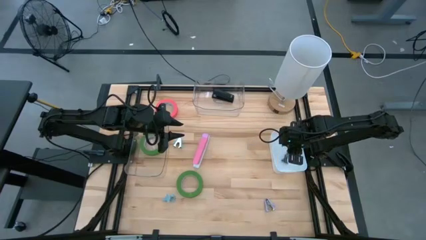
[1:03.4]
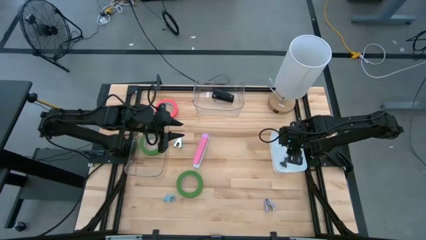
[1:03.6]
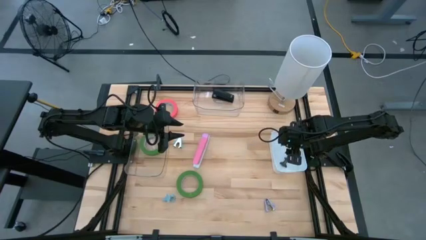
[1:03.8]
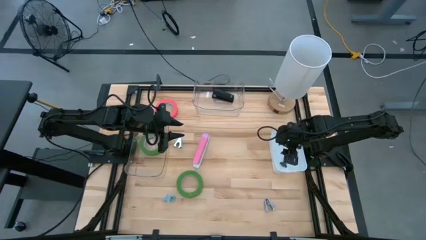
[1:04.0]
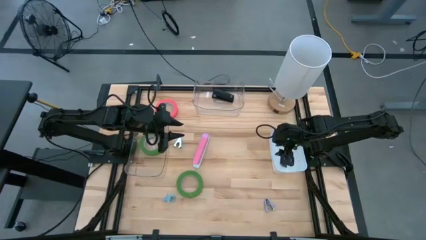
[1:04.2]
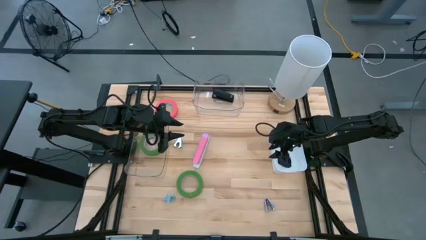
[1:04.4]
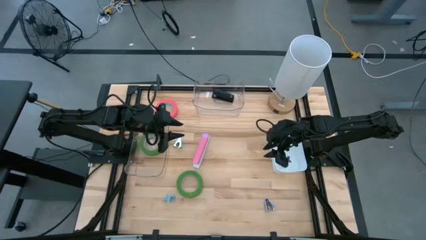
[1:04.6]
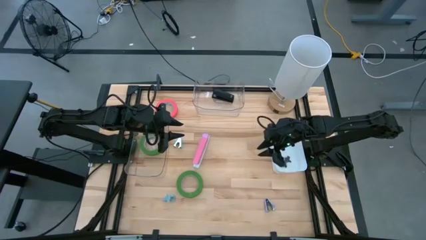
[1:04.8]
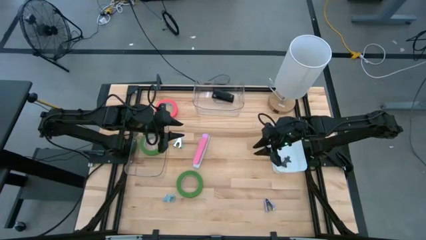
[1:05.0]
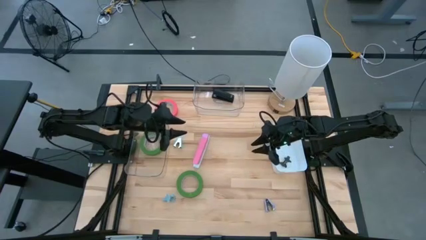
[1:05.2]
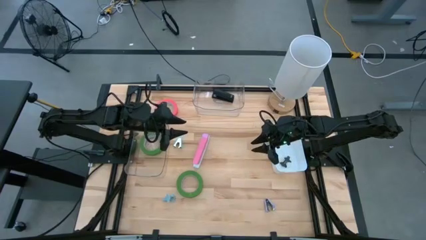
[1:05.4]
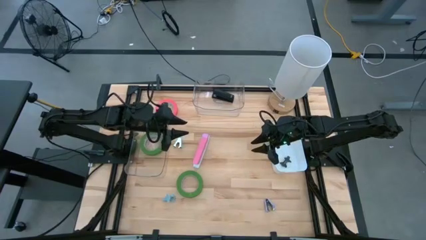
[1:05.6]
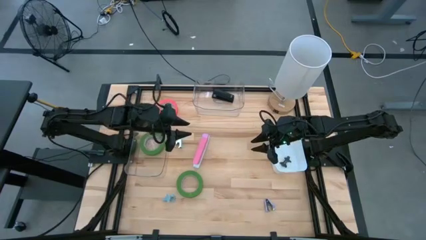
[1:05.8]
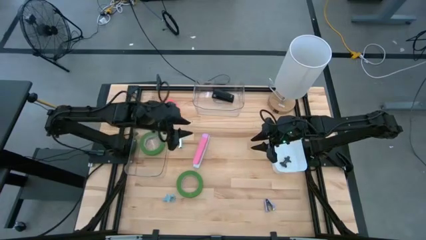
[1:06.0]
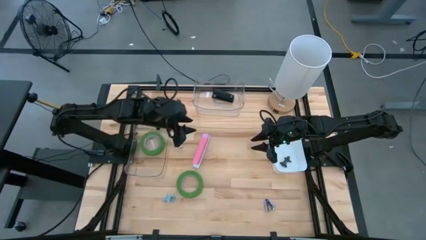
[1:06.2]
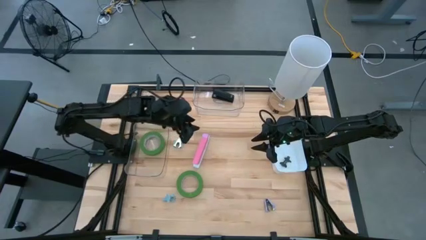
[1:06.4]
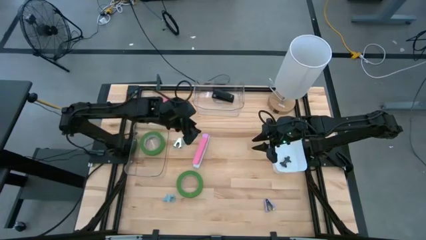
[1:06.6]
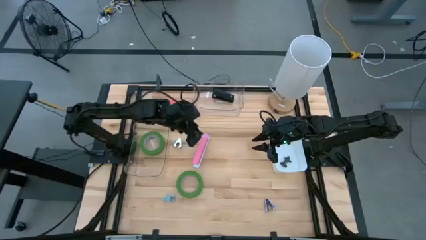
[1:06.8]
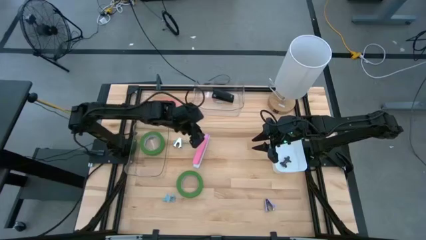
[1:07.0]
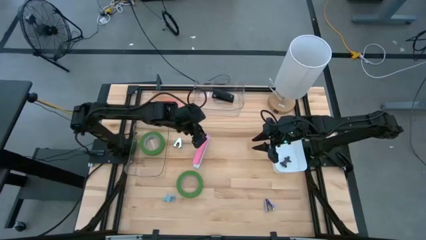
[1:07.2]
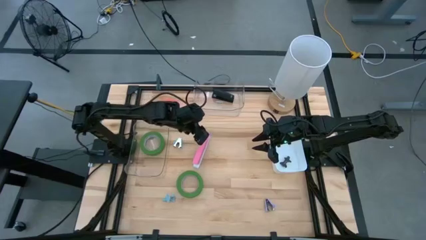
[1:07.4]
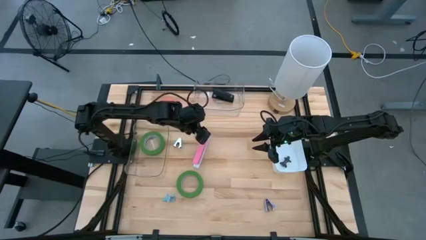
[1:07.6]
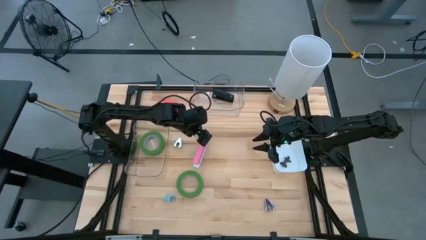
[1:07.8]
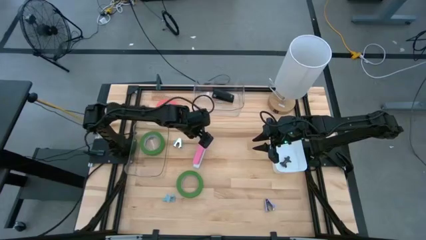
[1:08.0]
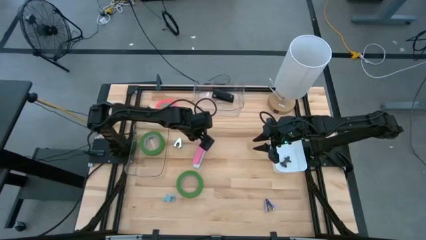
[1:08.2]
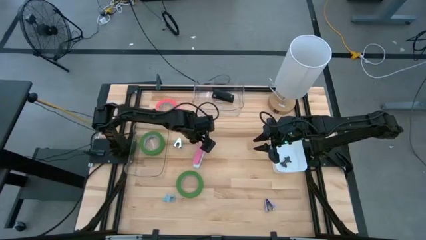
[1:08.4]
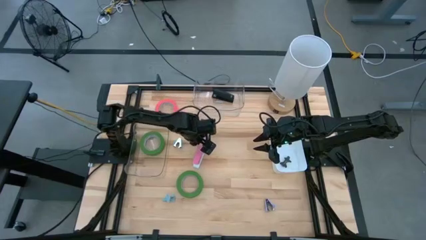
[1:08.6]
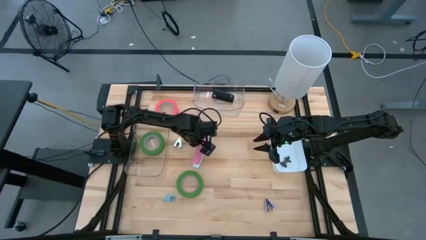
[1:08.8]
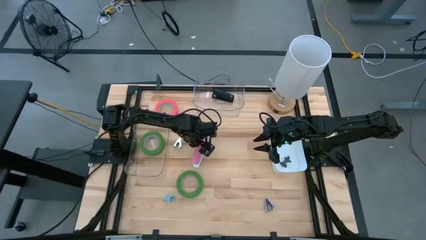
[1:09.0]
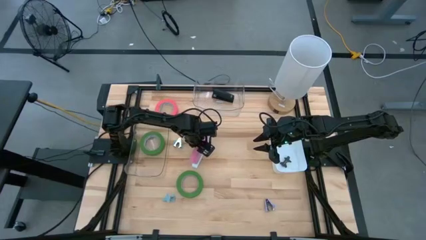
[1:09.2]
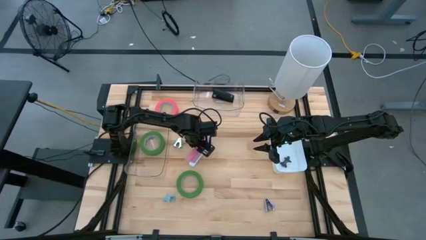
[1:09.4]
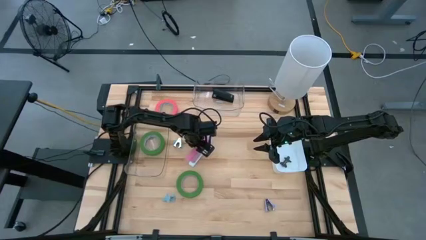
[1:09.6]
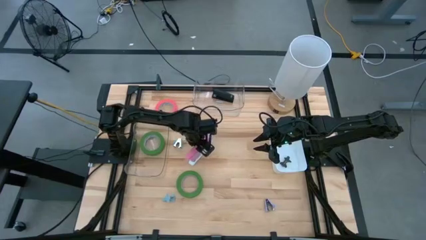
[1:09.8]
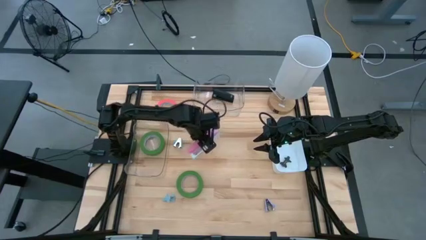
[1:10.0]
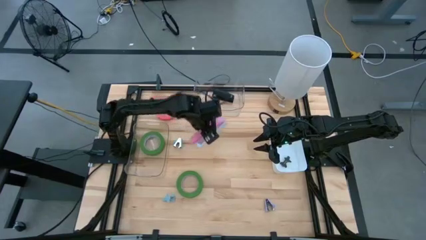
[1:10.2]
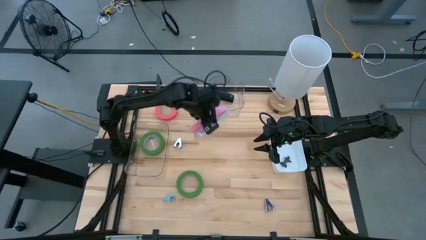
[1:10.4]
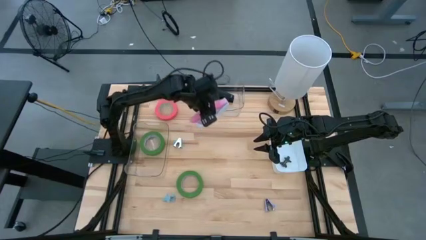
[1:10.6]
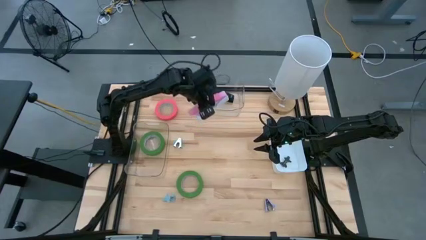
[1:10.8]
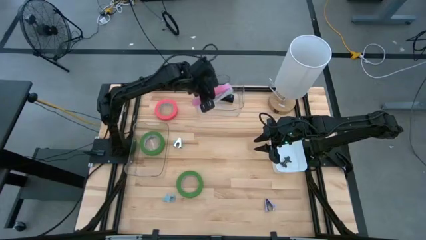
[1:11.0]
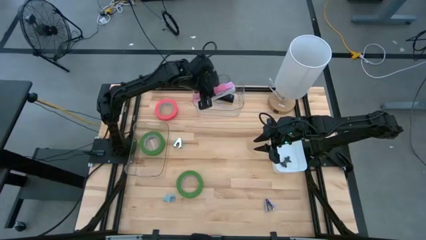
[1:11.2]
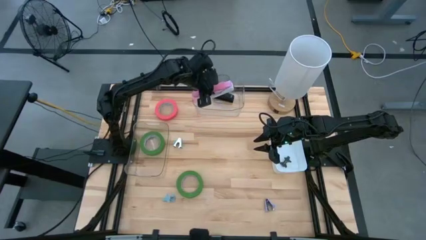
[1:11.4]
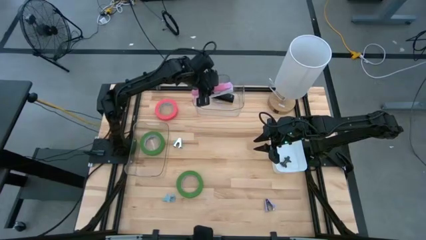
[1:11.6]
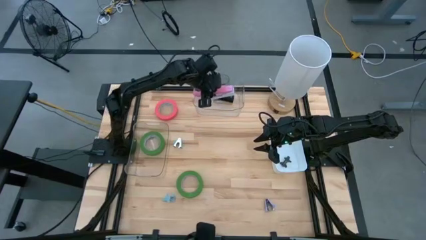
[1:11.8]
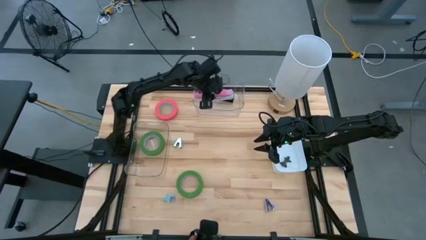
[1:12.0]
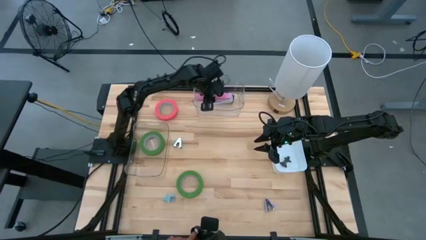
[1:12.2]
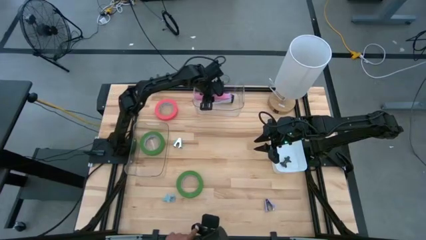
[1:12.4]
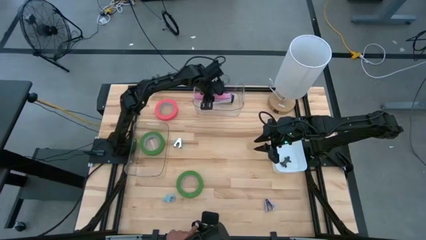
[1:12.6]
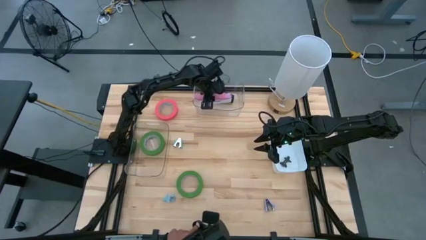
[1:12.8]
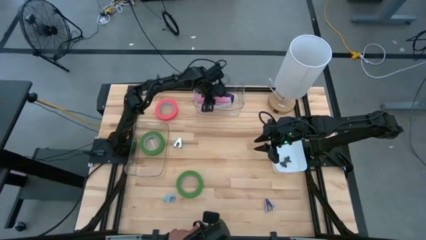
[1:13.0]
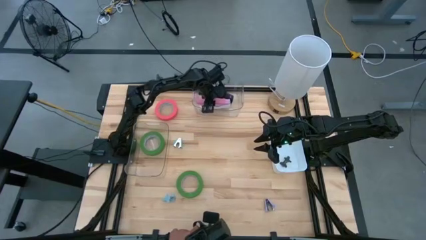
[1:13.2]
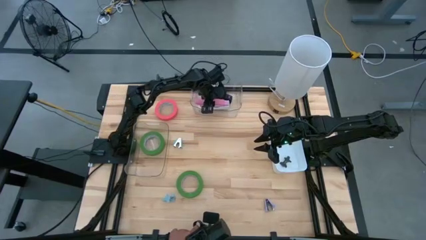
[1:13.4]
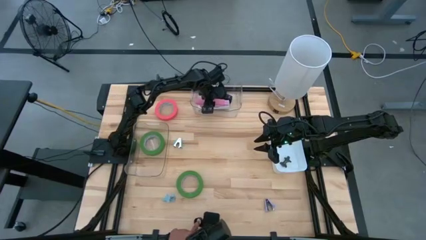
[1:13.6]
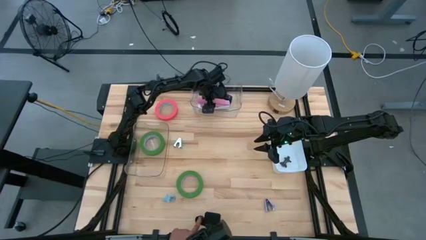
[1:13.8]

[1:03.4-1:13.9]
Task: Pick and place Stapler, Stapler remover, tape
Put the pink stapler into the top transparent bin

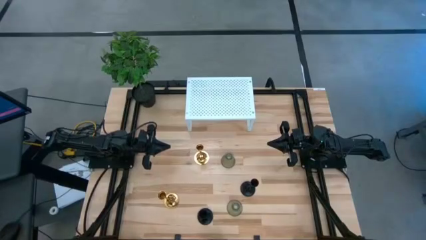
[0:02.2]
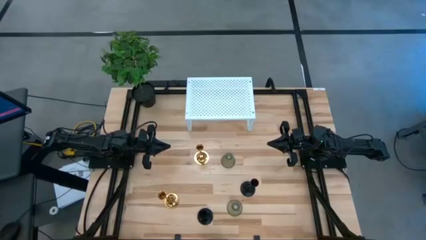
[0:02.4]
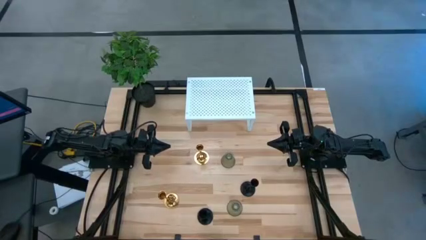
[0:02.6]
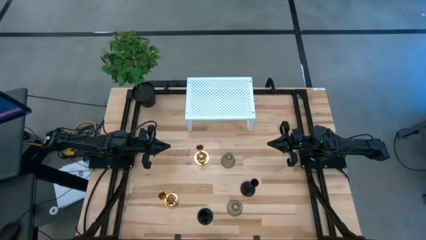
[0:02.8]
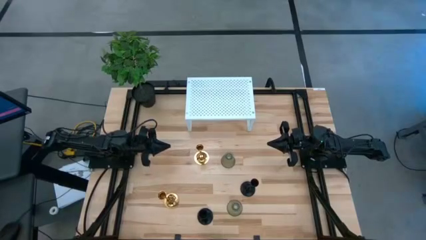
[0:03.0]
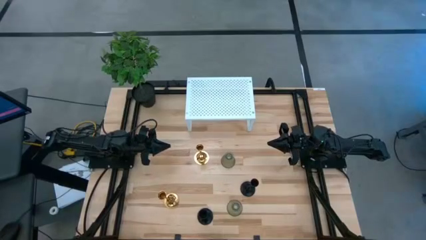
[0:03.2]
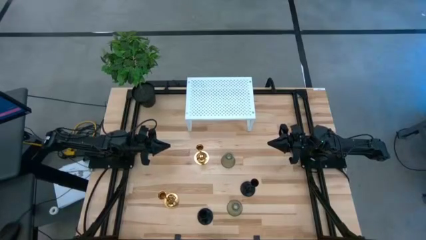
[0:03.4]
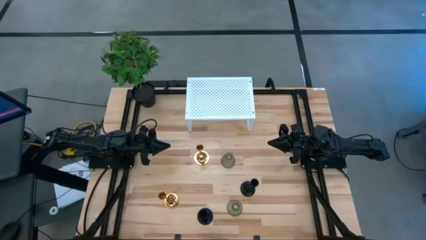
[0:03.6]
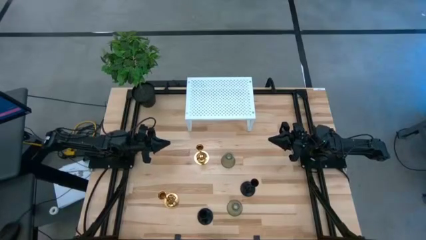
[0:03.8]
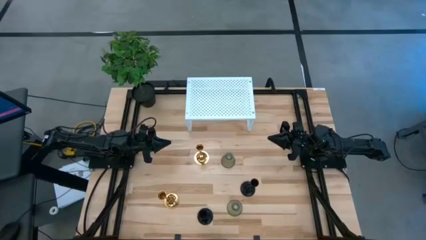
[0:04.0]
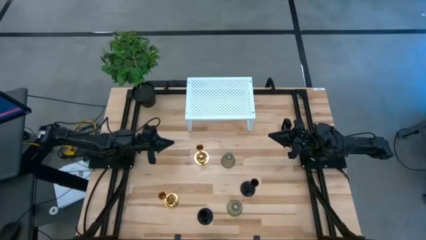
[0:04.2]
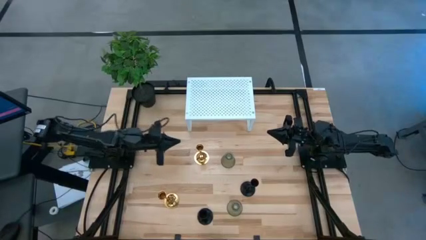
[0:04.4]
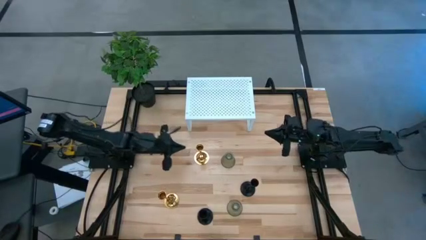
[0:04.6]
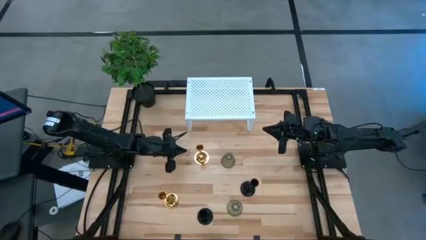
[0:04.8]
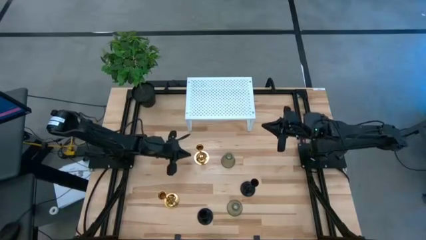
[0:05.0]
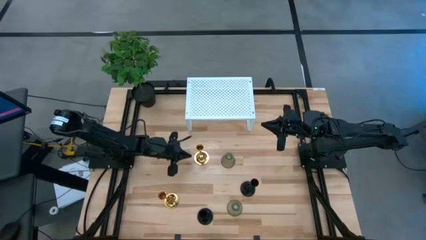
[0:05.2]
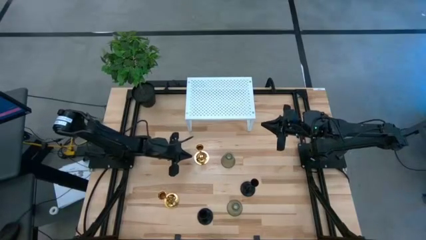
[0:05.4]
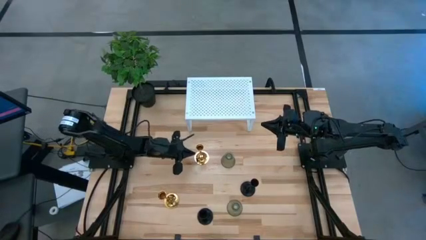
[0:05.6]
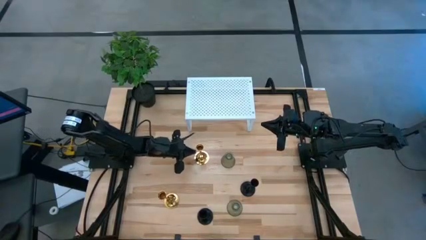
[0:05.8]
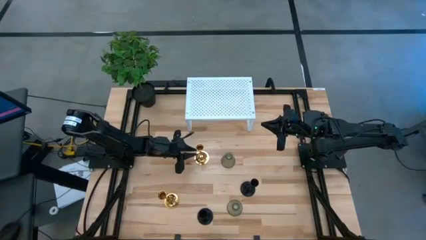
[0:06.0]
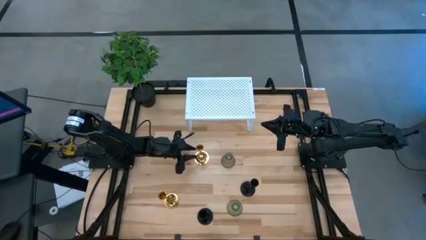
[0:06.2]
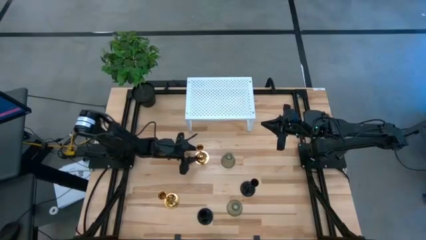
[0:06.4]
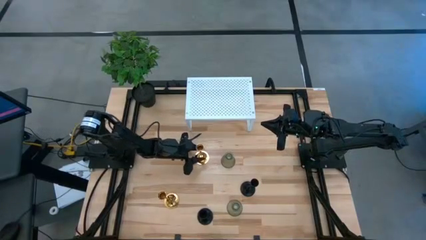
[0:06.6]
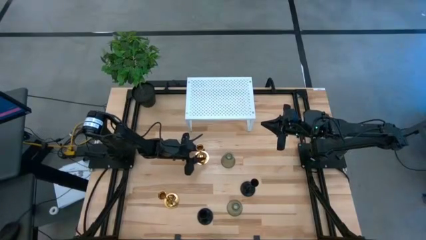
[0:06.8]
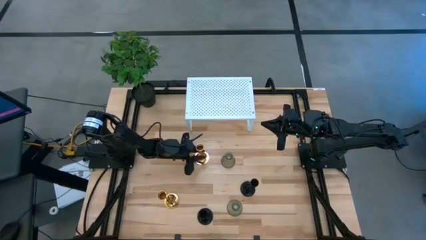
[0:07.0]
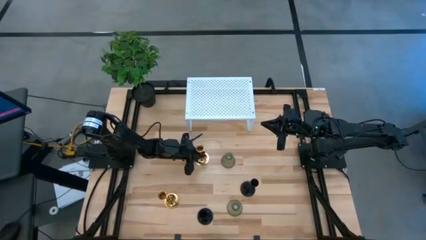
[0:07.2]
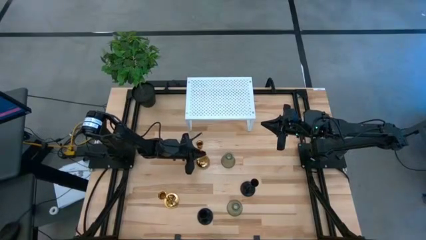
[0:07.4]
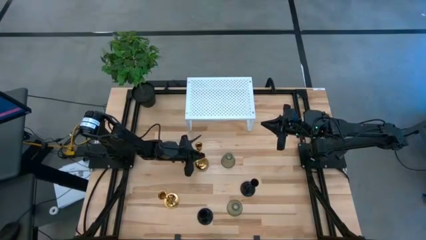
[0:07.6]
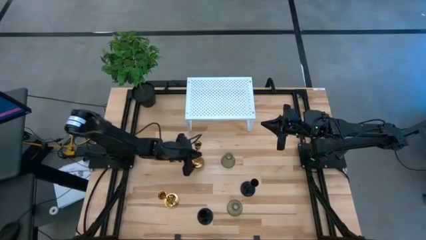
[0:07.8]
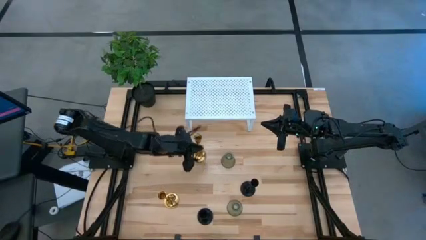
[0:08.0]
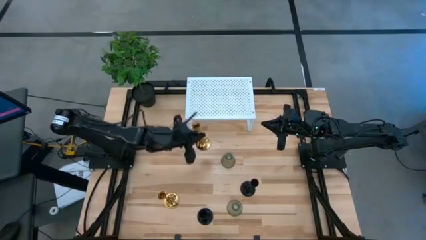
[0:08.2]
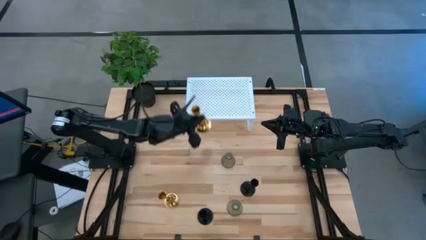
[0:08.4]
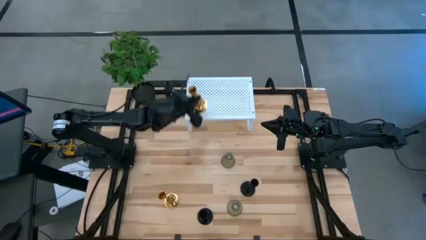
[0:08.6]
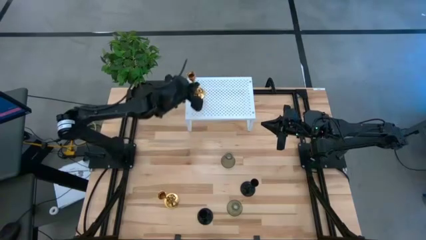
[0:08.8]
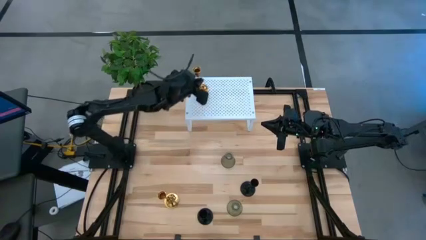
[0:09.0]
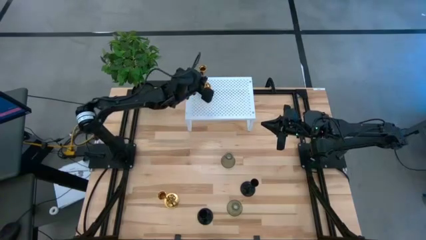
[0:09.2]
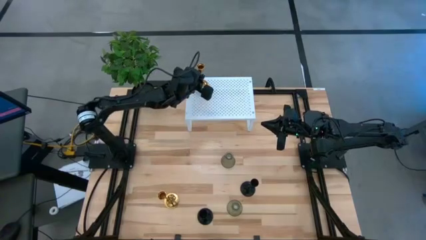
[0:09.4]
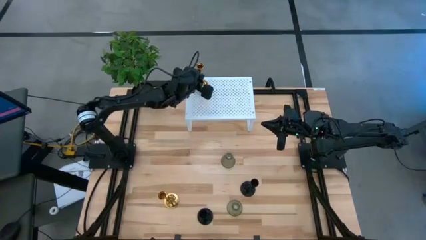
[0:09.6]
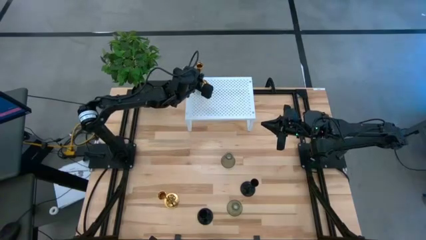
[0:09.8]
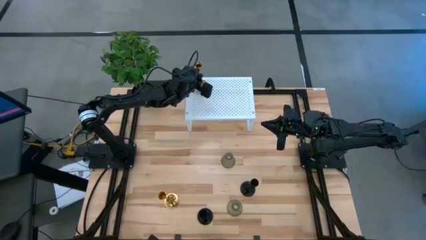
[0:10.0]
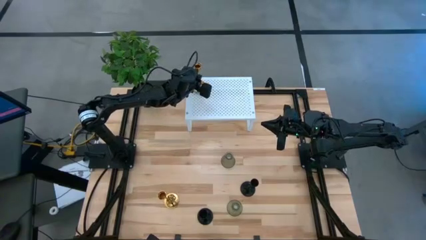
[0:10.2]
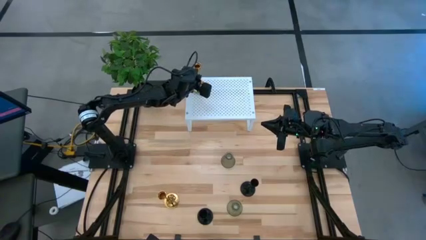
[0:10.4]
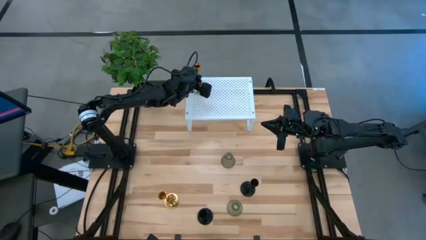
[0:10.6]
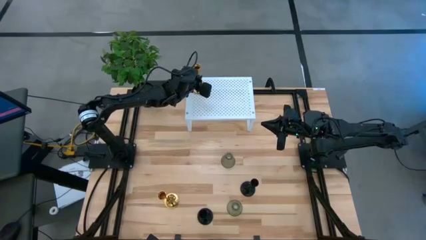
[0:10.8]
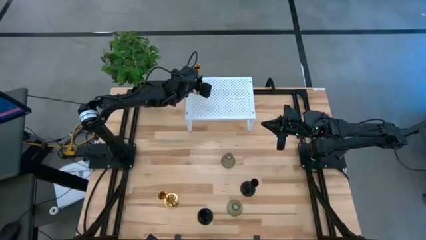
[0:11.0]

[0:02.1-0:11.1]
Task: Pick & Place candle stick holders
Put the top gold candle holder on the shelf
